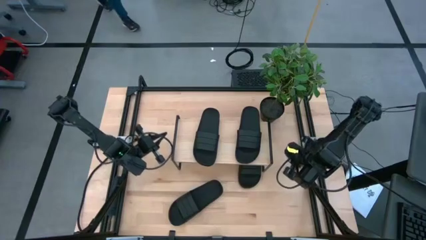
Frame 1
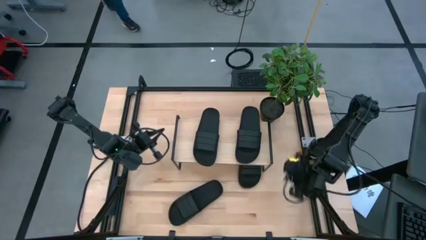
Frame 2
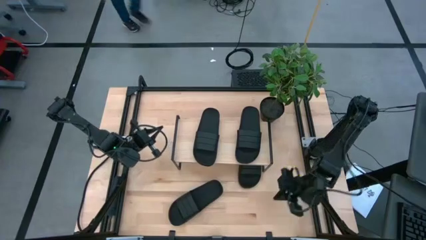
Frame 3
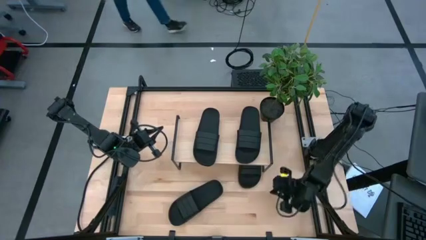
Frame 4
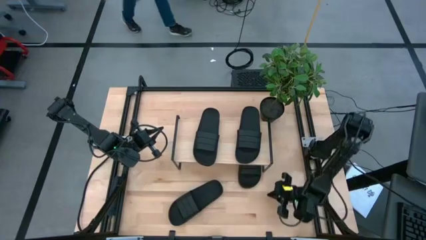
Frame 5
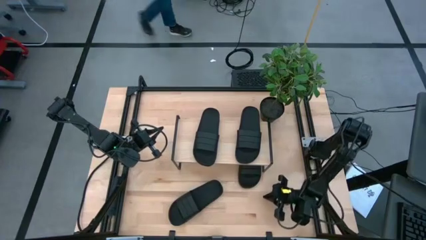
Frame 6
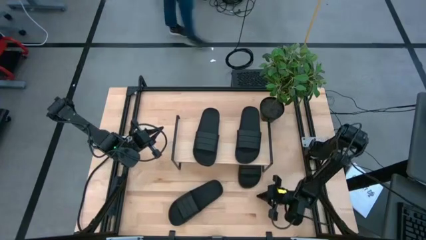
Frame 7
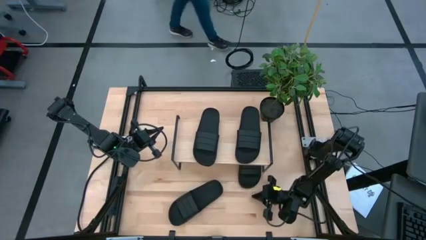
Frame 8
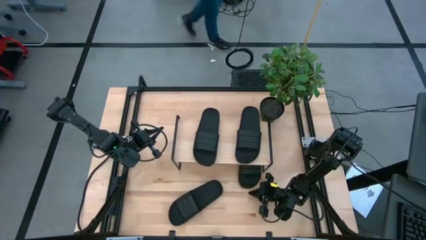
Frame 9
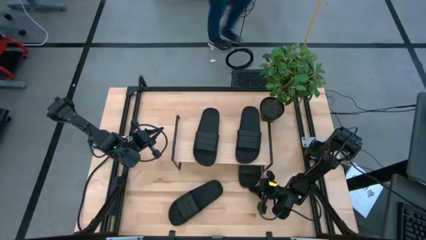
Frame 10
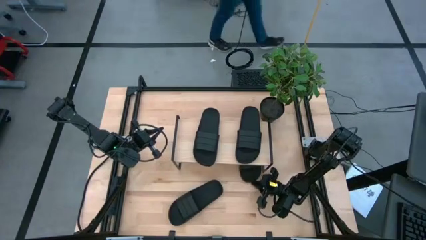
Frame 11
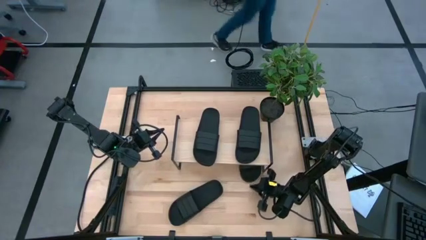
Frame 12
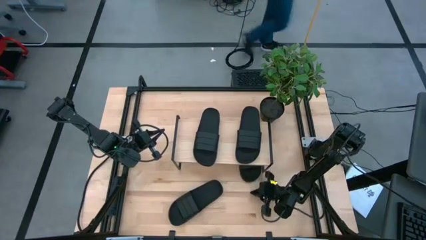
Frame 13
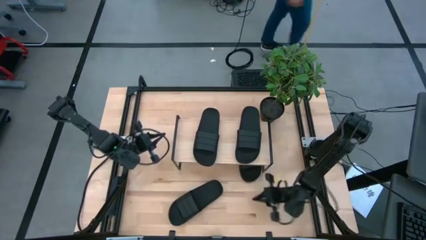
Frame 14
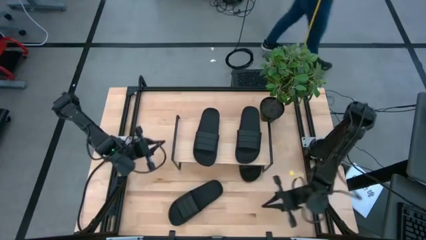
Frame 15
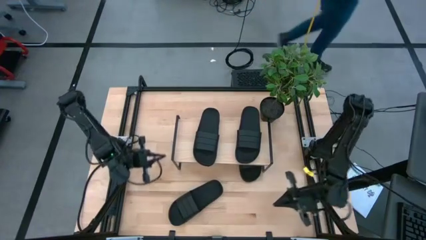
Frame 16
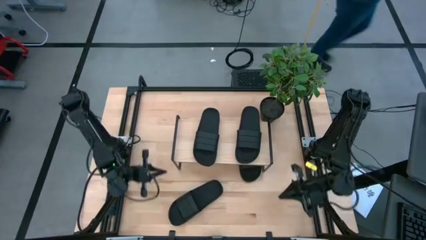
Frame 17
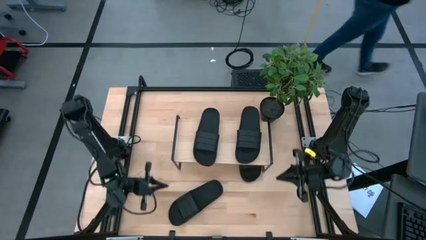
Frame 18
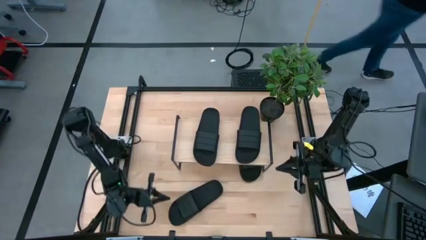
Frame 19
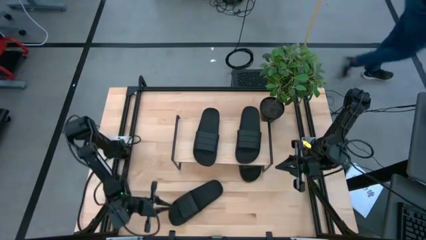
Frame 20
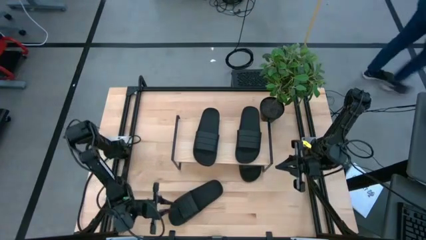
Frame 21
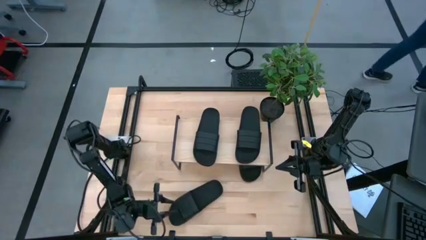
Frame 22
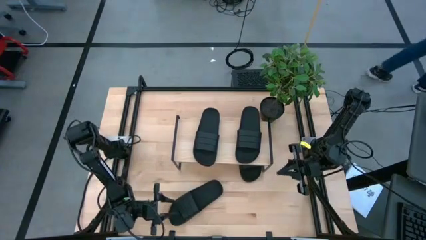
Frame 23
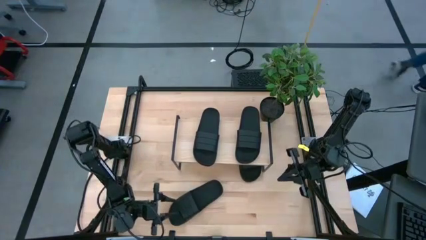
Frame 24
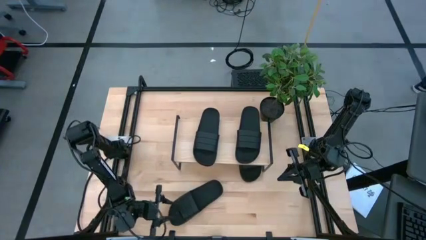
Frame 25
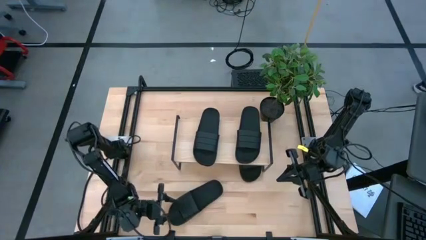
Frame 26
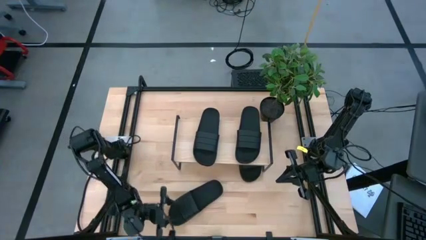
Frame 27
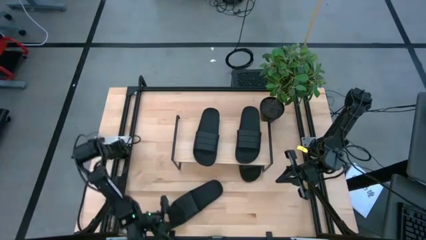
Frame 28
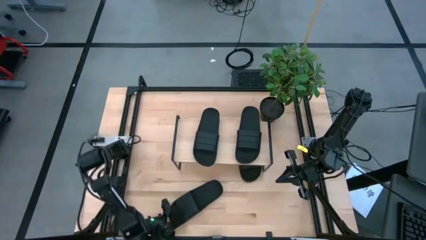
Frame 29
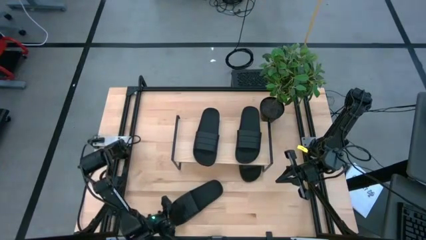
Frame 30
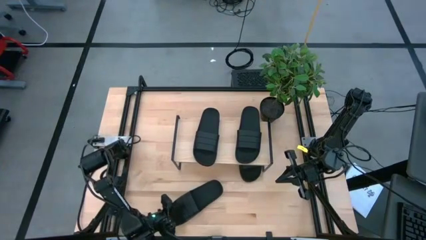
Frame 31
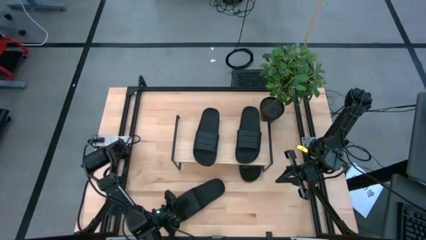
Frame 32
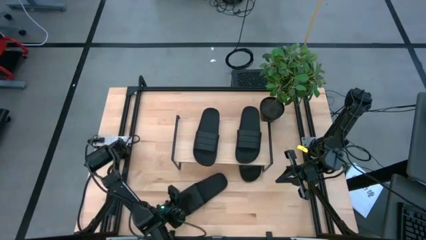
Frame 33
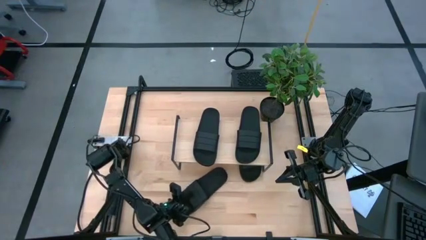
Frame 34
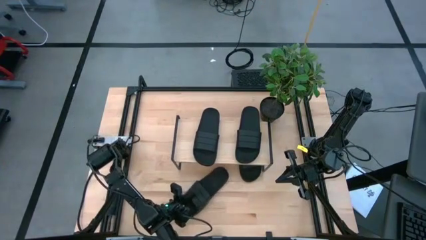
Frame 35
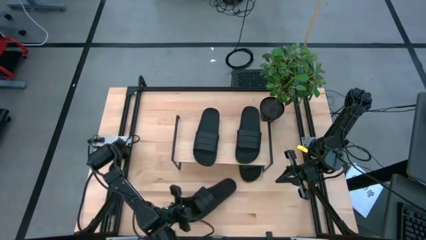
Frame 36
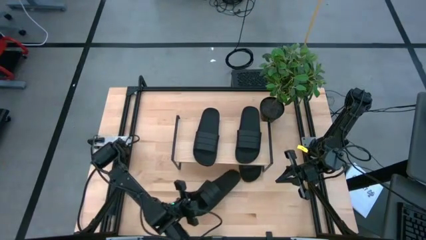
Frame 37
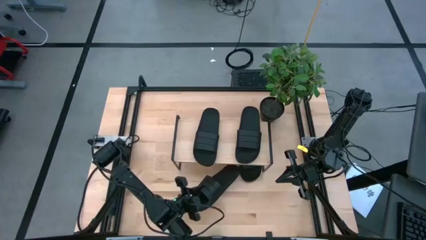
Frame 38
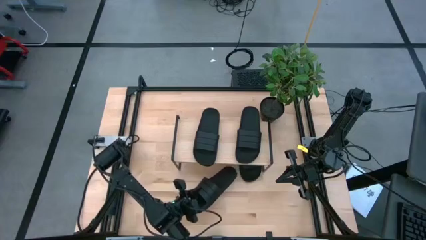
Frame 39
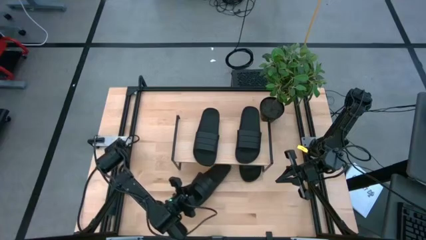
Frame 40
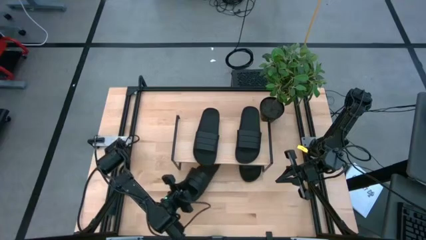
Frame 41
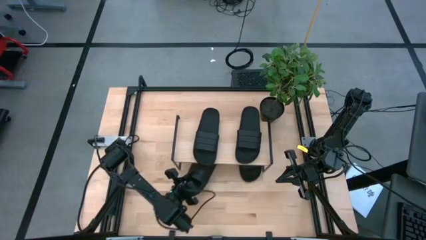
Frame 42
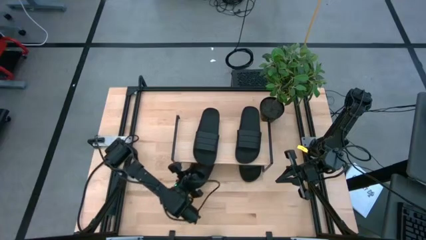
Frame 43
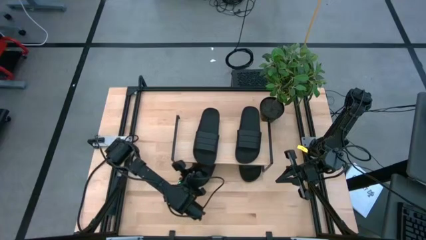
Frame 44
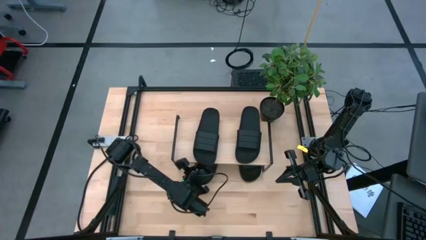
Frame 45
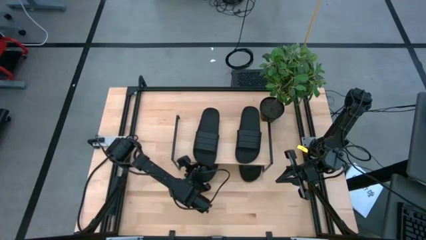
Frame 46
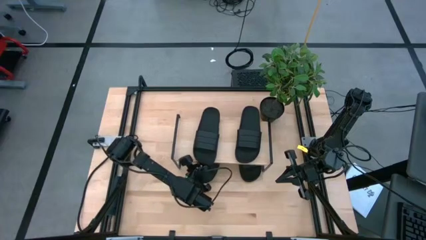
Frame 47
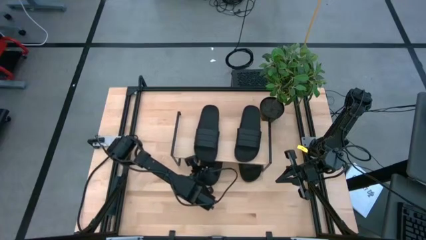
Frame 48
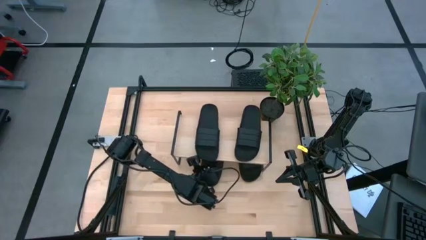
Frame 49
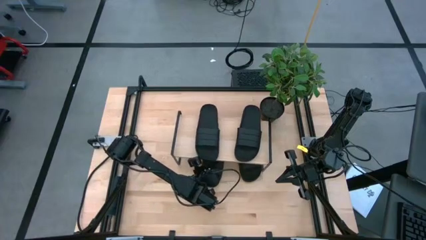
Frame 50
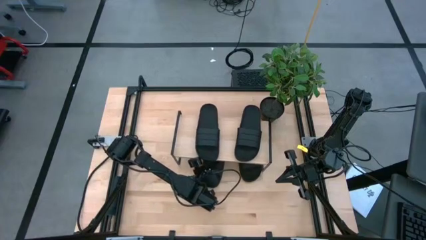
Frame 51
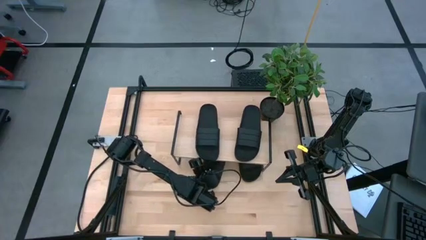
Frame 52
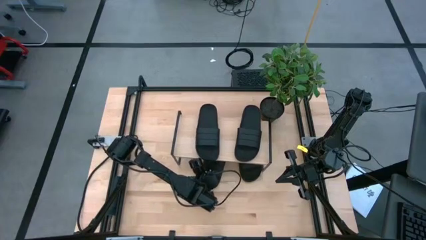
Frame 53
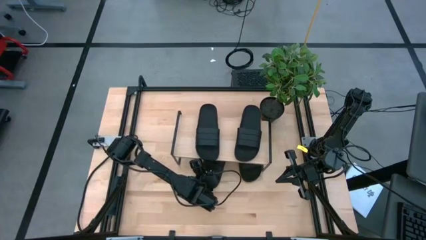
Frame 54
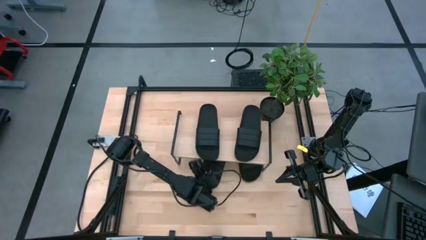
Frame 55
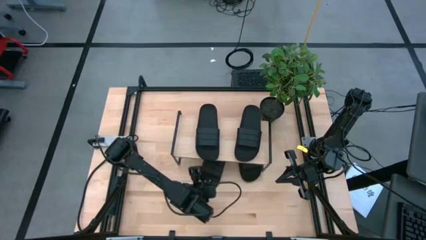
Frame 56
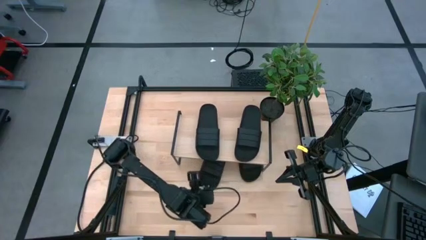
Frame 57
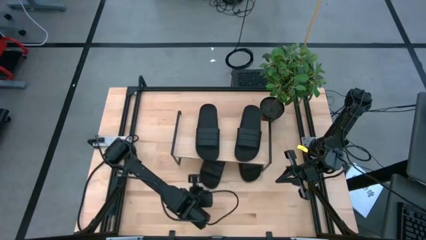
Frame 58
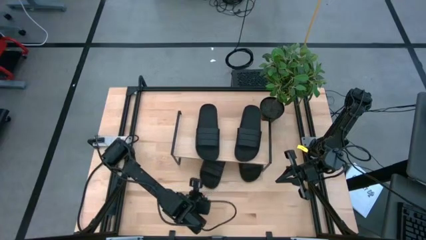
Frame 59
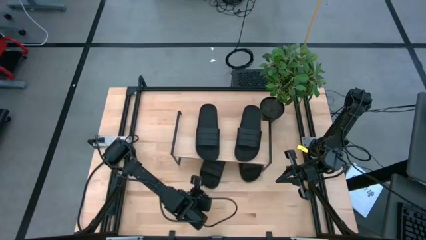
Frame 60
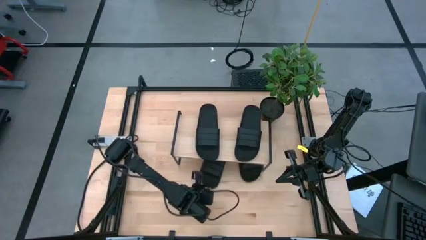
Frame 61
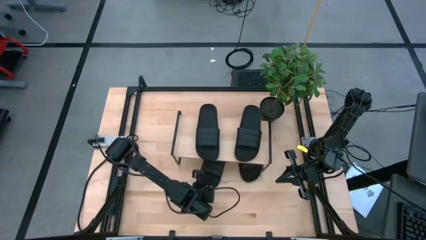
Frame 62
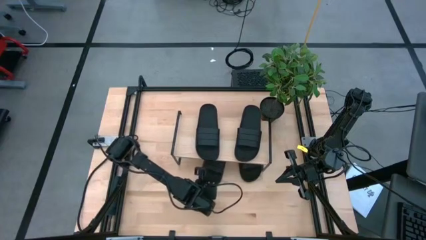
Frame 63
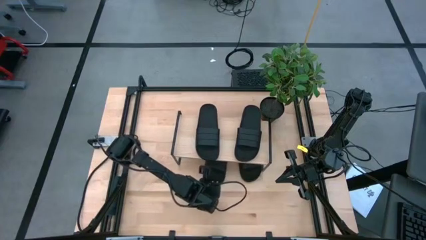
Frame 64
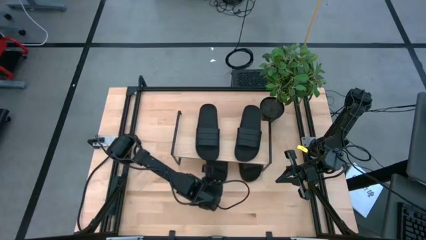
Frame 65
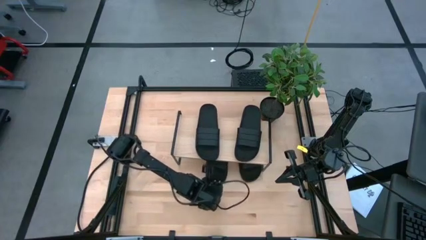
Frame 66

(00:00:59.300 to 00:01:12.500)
Task: Pick and place slides into the shelf
Put the black slides under the shelf

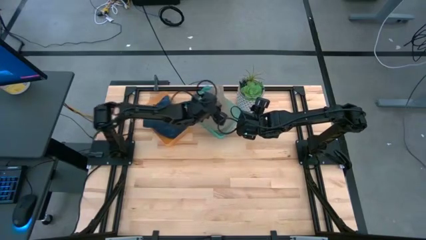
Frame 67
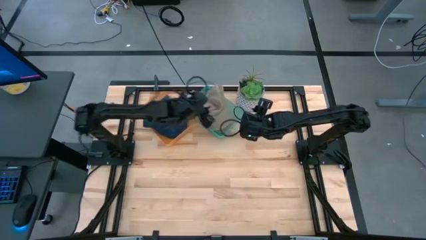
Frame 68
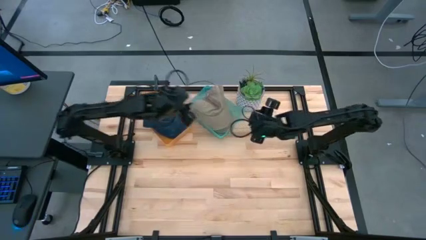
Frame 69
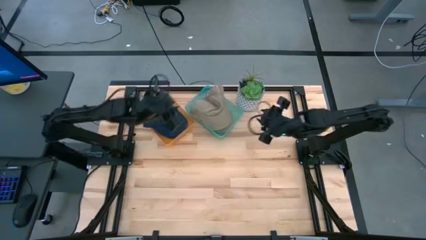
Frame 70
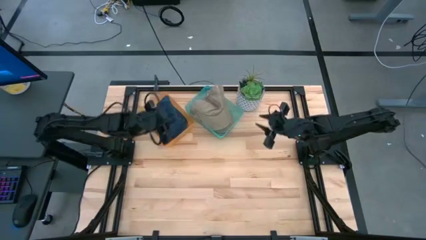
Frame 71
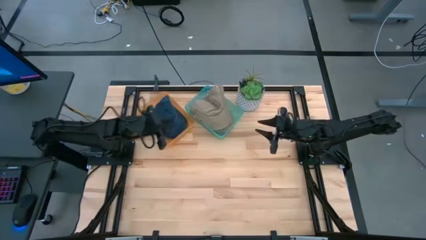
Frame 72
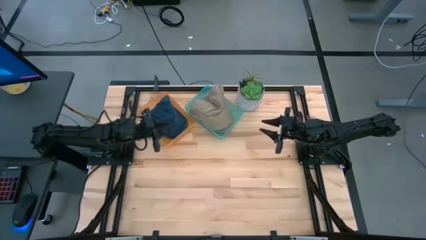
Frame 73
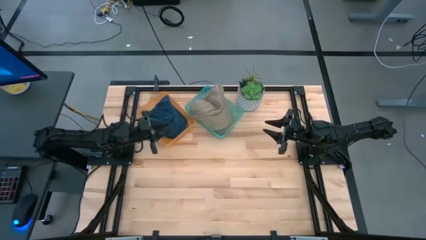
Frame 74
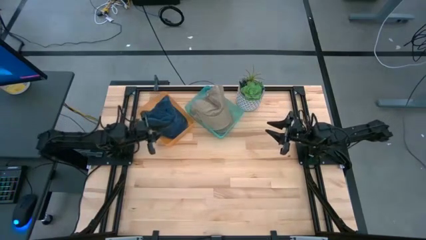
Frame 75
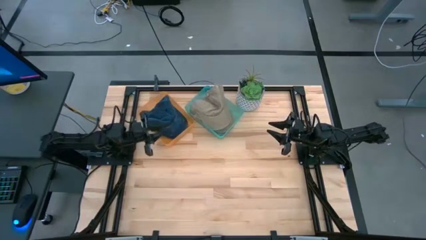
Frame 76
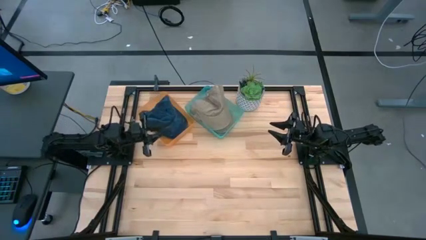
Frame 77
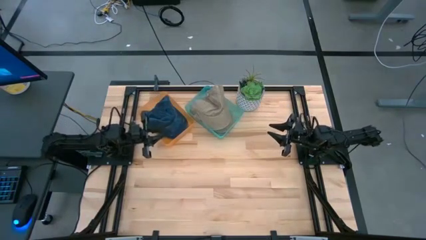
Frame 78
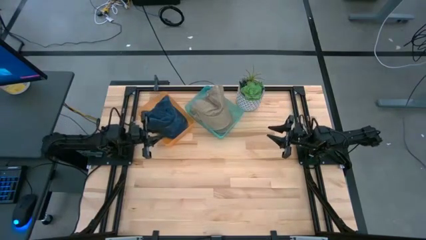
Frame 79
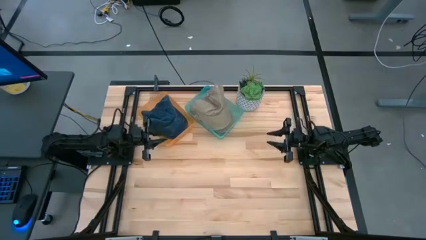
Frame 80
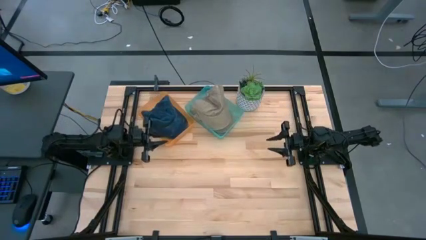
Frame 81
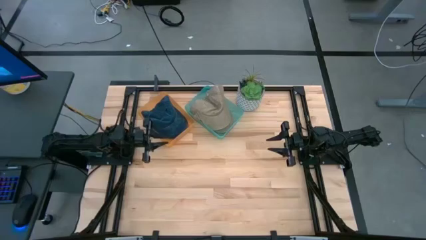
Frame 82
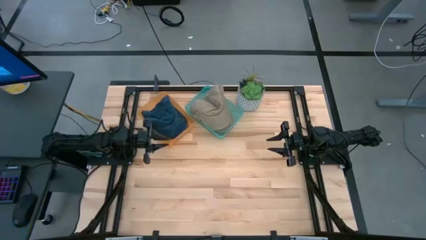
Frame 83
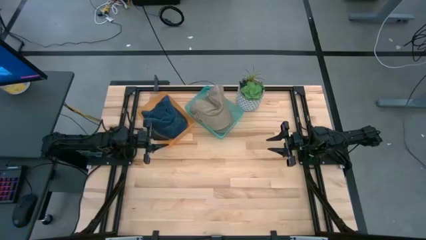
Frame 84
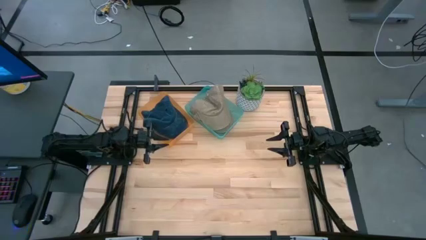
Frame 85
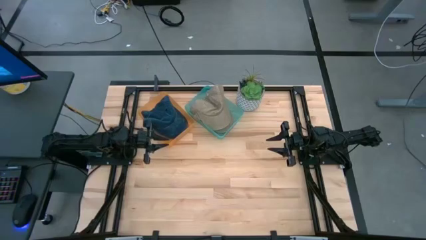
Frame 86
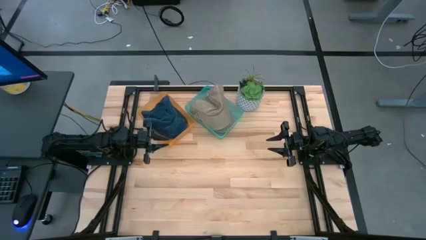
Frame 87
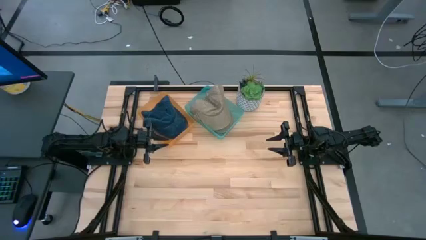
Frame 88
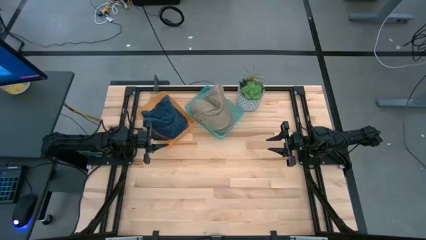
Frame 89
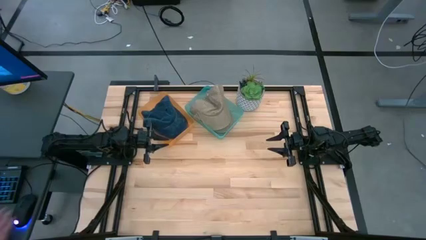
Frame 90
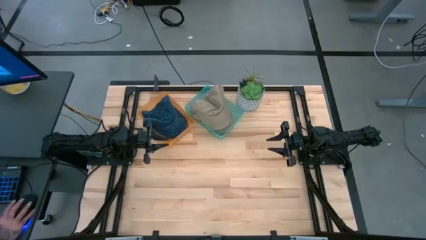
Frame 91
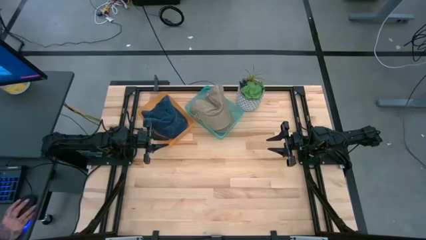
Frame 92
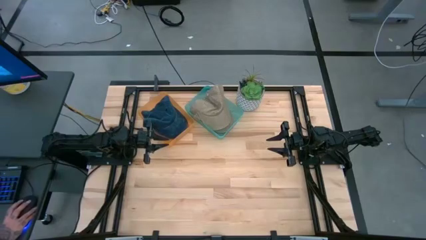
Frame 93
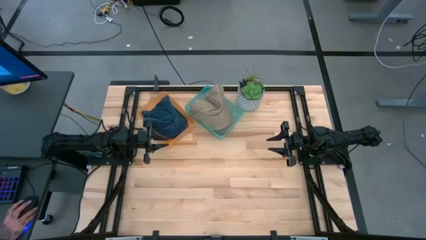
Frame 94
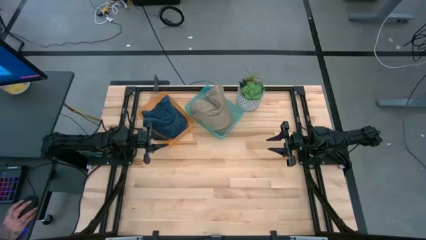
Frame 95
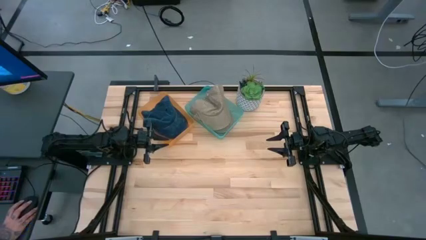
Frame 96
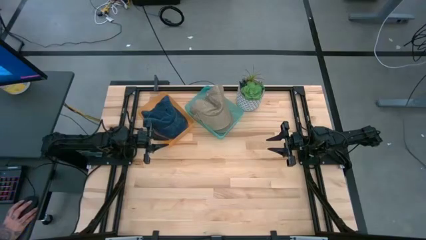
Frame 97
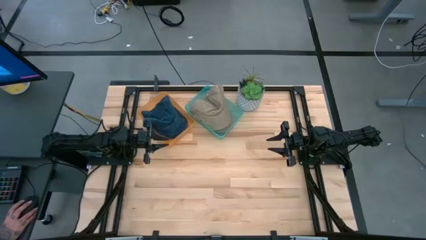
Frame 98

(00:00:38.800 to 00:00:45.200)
Task: Pick & Place hat
Return to Home Position
